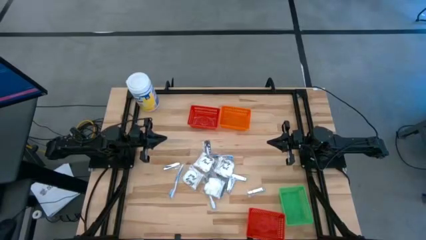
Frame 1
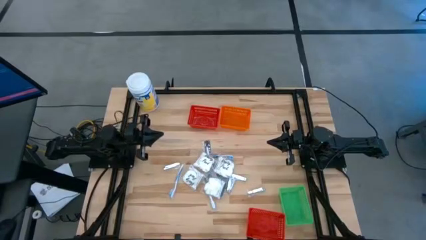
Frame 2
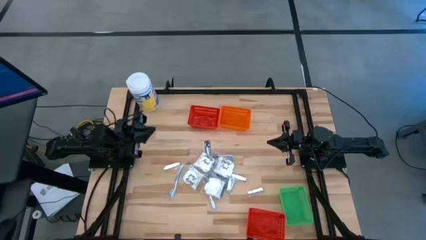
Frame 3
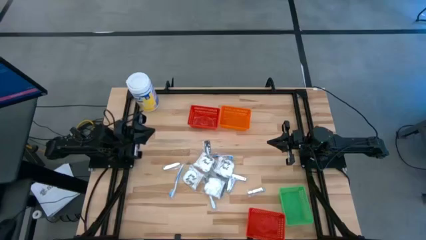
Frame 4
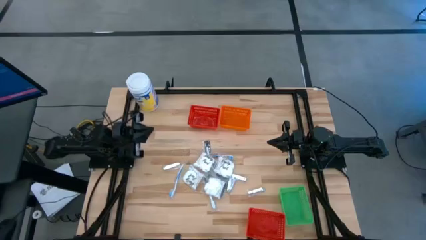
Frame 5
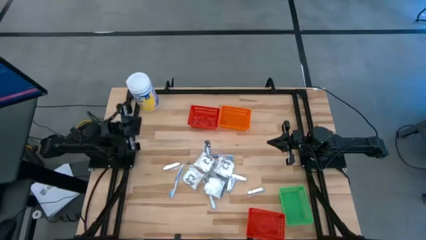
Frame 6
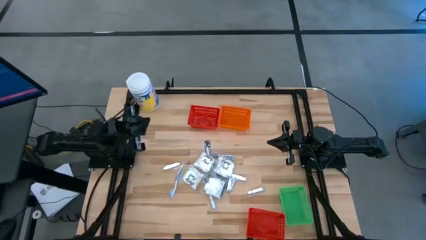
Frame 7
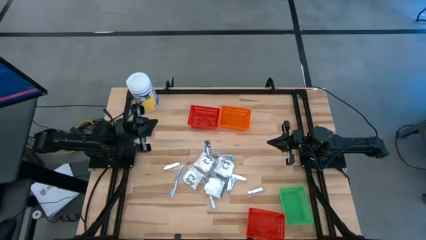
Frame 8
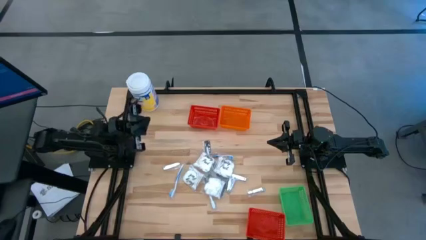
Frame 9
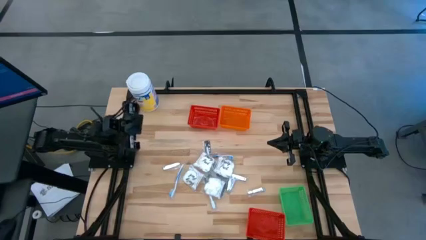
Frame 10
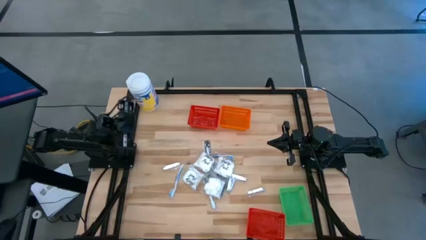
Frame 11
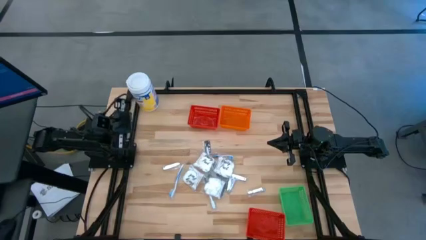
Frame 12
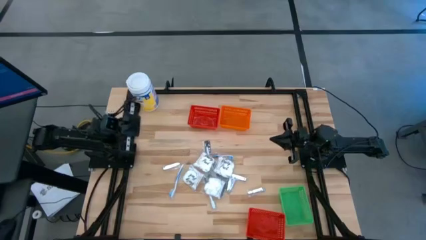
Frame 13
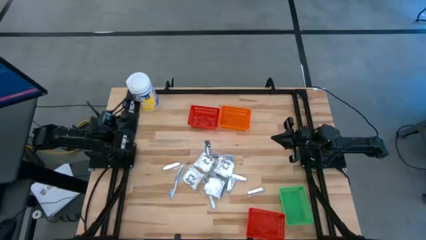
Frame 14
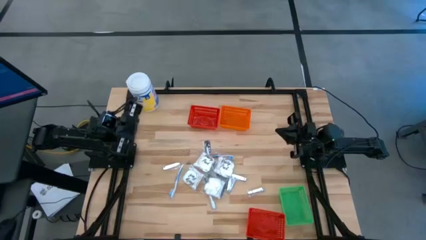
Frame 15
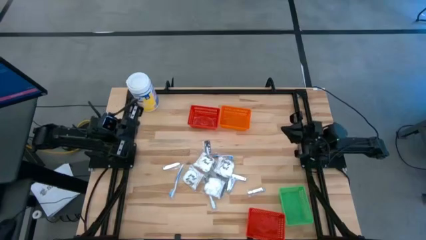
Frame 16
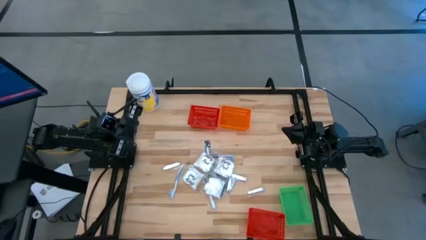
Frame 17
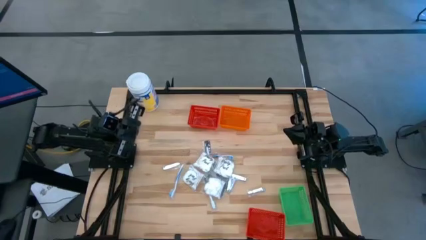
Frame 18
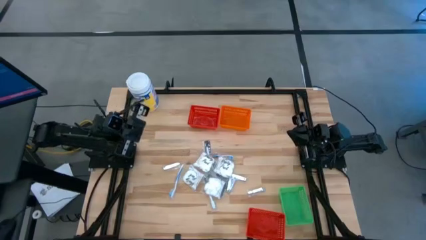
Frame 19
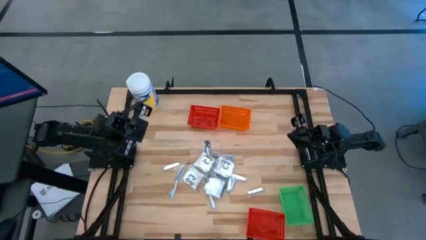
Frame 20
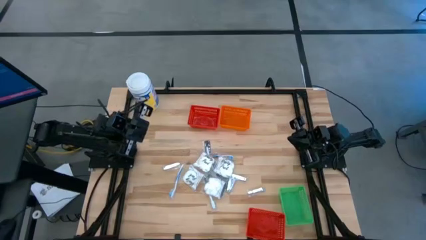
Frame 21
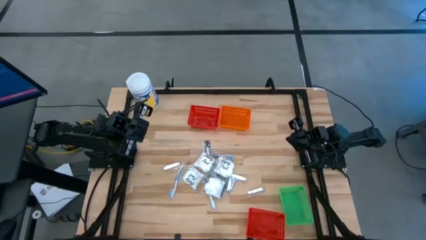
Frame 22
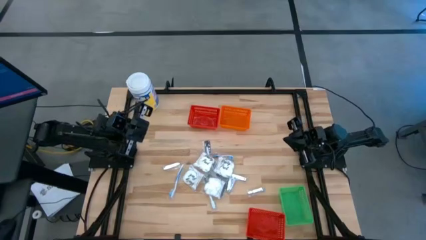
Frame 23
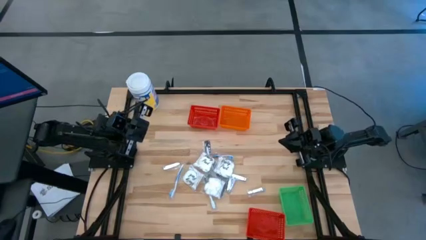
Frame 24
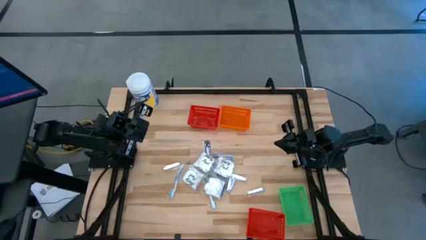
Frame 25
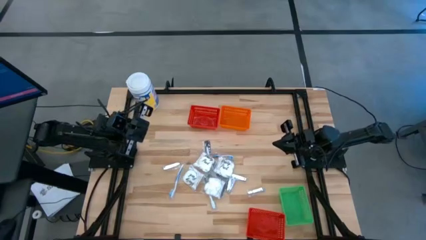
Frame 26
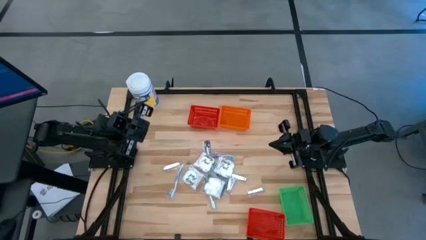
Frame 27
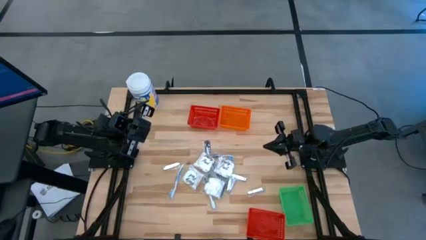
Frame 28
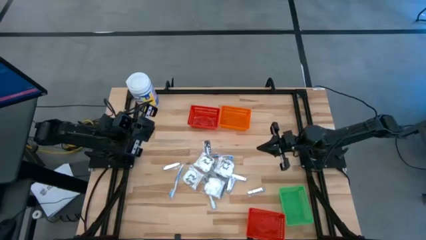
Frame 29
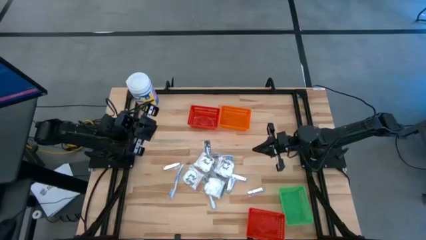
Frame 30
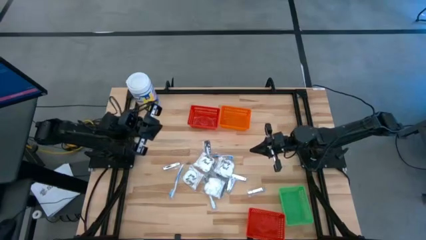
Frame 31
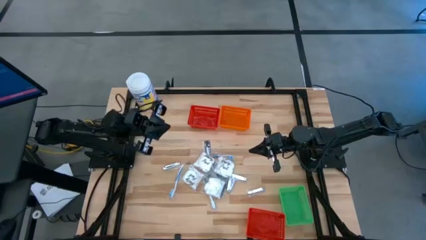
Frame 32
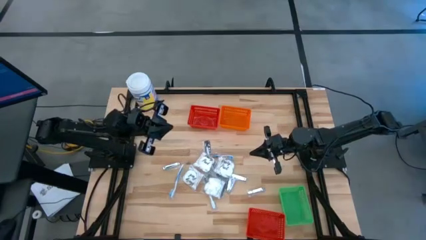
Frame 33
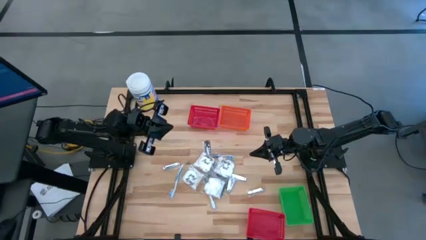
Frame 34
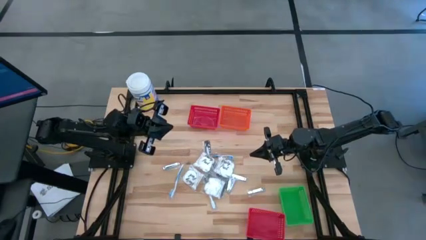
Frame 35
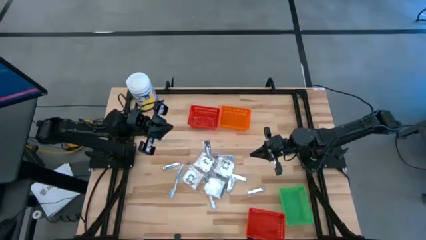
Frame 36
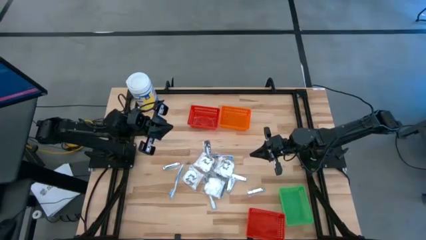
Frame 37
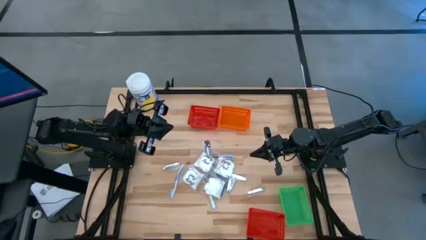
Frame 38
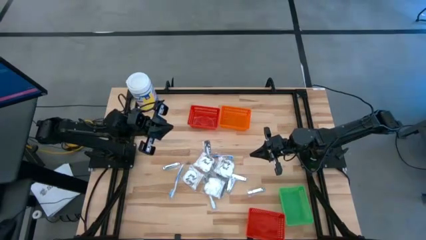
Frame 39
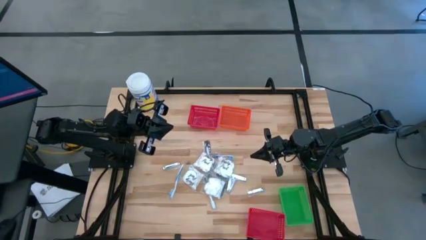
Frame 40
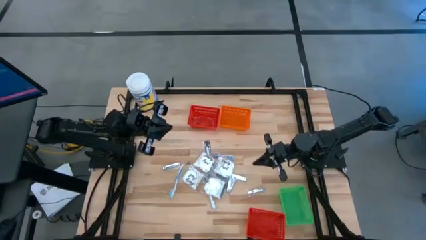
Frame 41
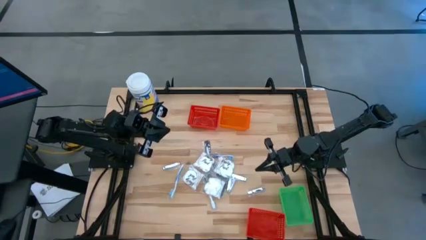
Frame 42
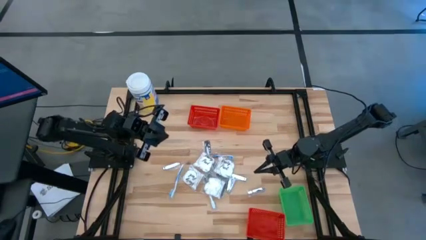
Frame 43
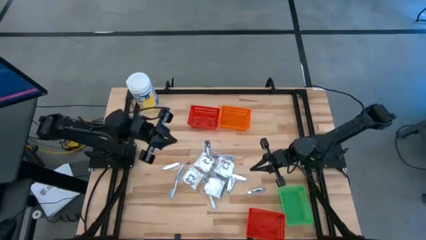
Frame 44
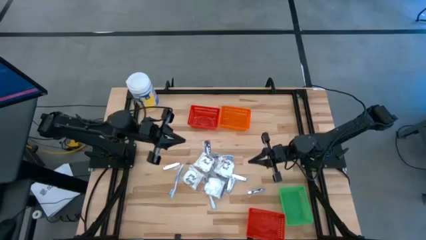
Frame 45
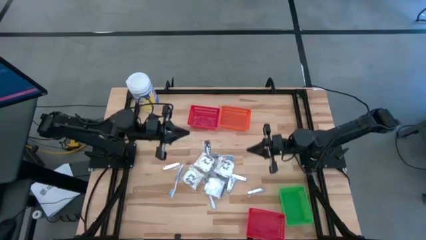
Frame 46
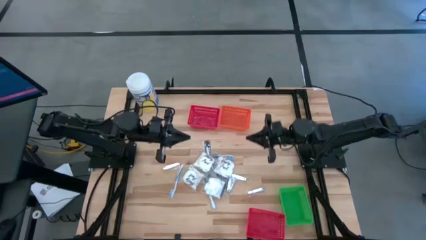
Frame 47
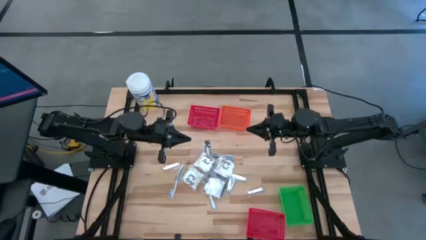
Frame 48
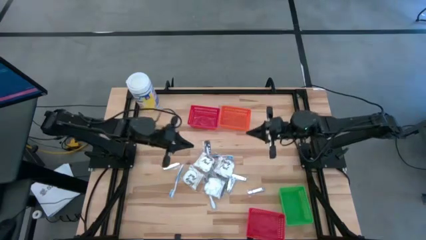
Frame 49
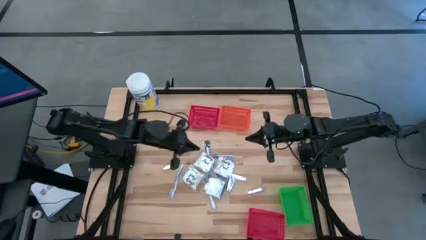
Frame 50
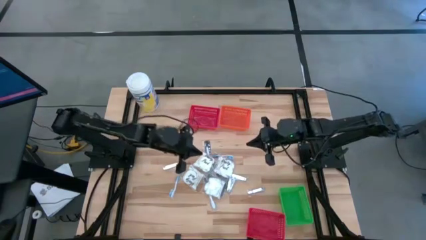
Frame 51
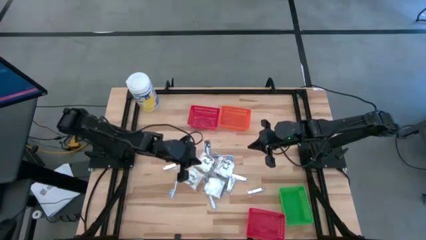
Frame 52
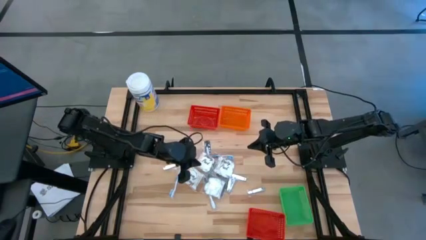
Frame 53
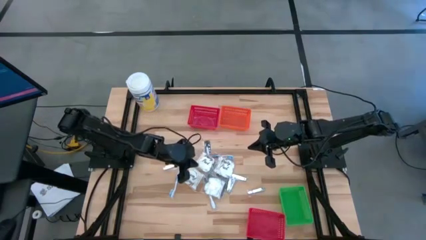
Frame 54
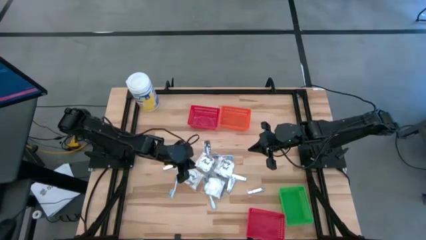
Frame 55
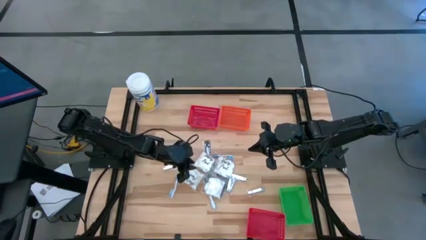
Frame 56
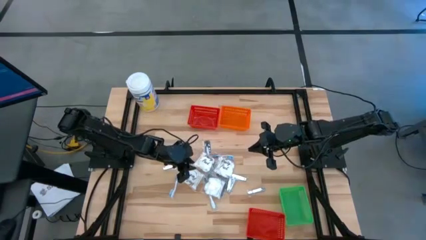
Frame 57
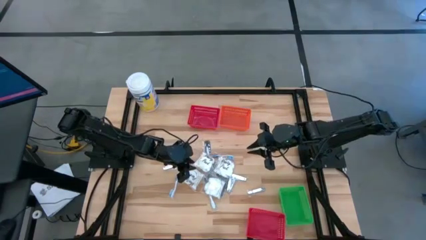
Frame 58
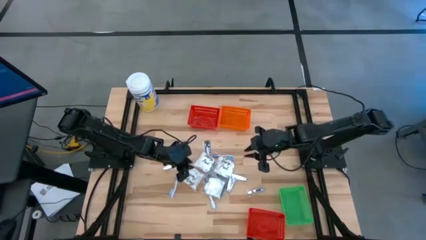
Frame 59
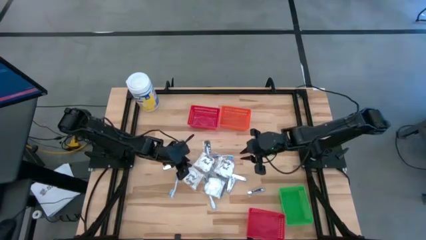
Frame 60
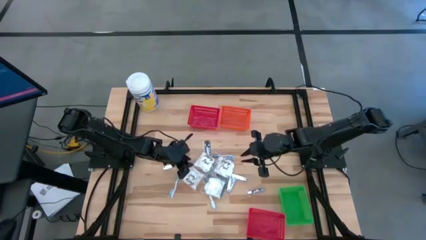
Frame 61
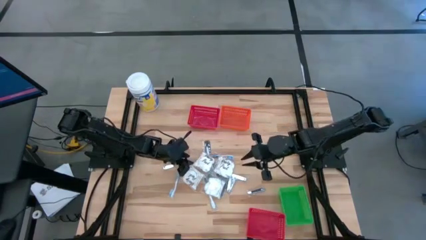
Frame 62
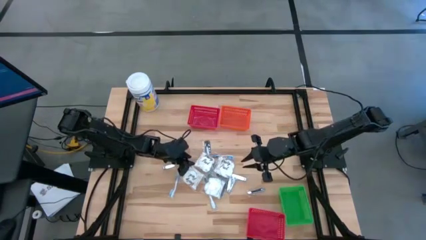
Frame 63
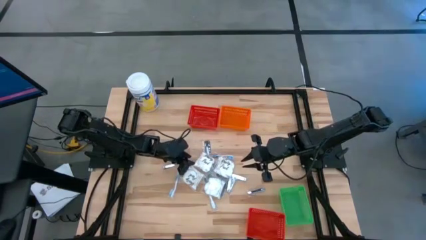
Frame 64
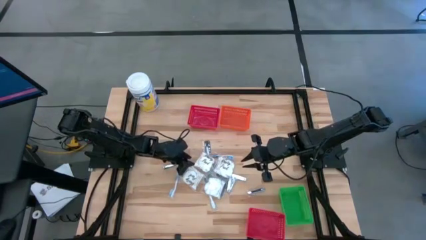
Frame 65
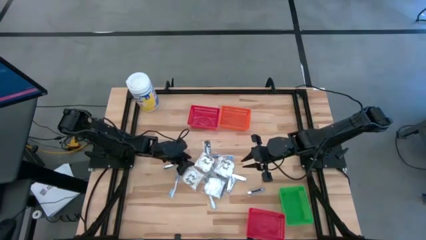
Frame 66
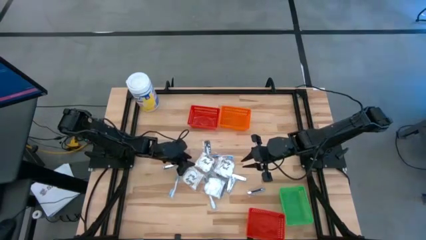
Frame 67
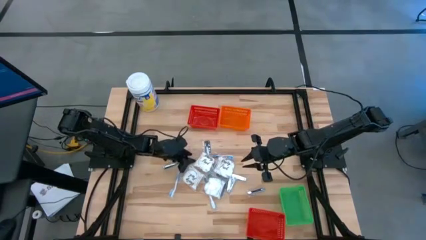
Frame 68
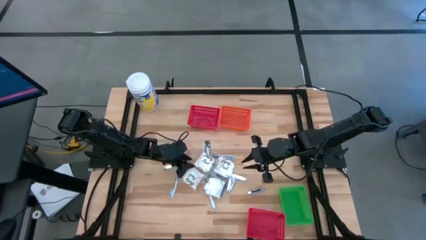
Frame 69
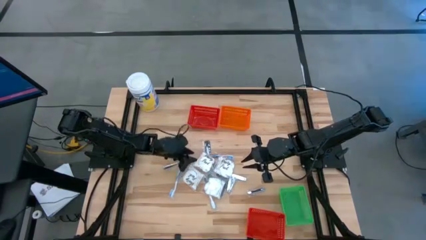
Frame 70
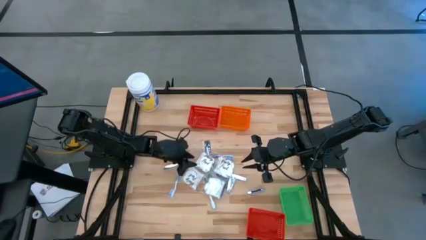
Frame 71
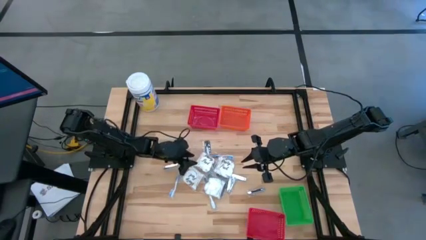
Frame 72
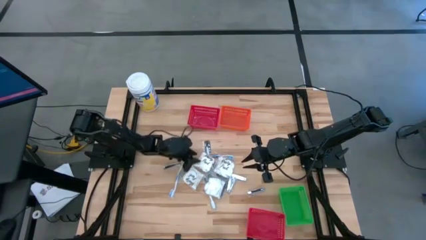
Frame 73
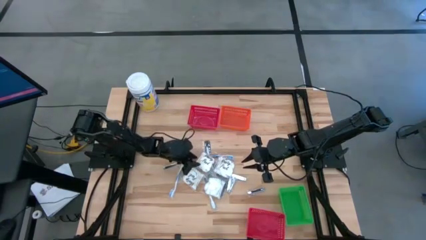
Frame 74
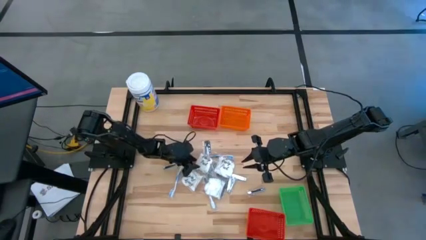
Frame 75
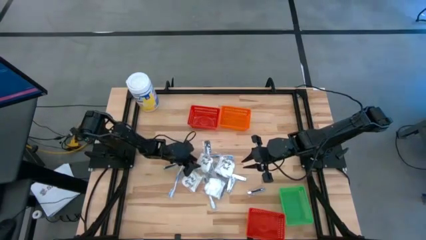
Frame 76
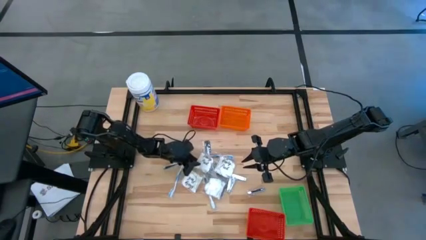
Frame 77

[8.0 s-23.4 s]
Task: Pick & Place Travel size toiletries
Put the white cotton pack into the orange bin
